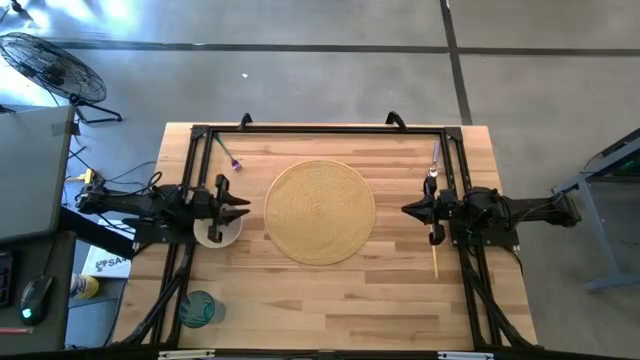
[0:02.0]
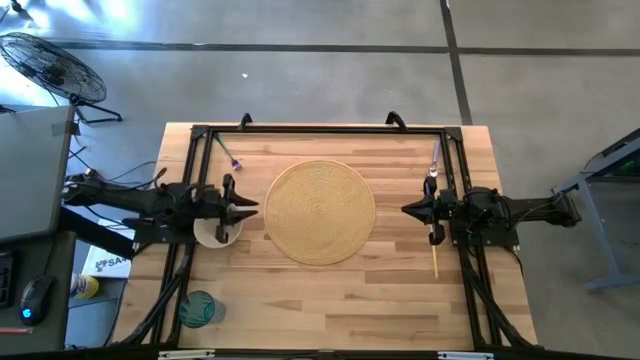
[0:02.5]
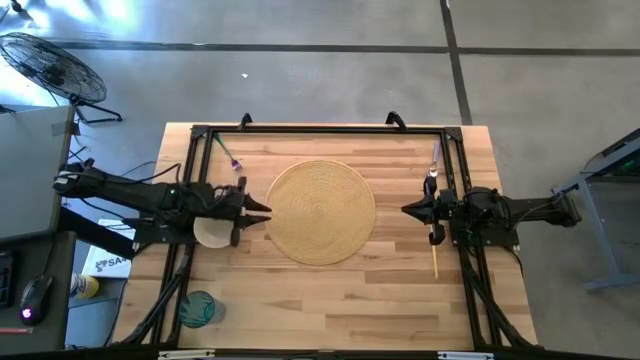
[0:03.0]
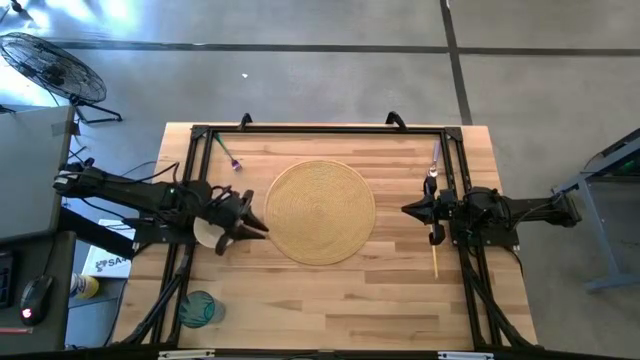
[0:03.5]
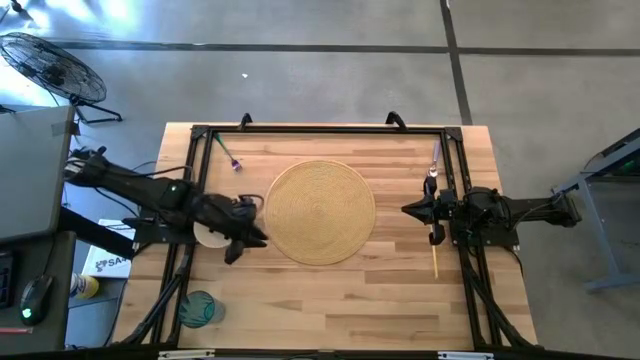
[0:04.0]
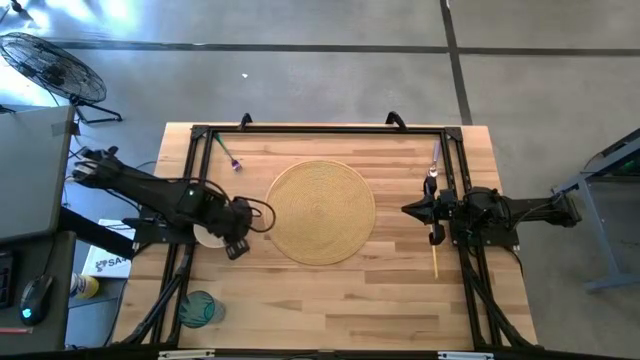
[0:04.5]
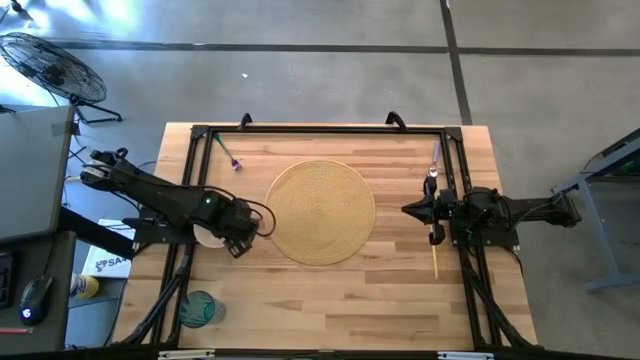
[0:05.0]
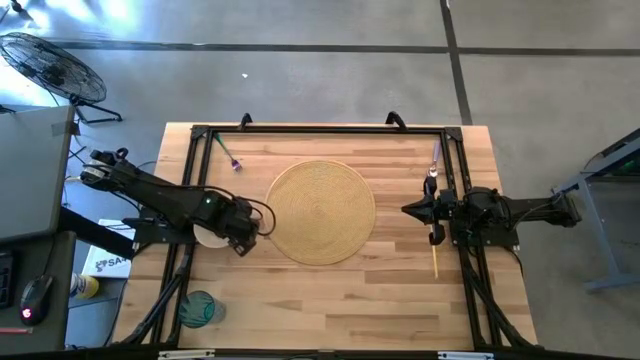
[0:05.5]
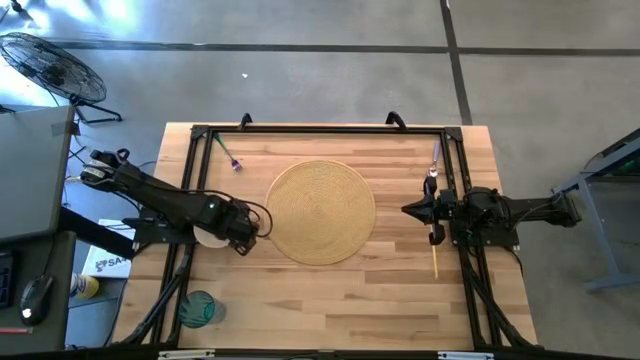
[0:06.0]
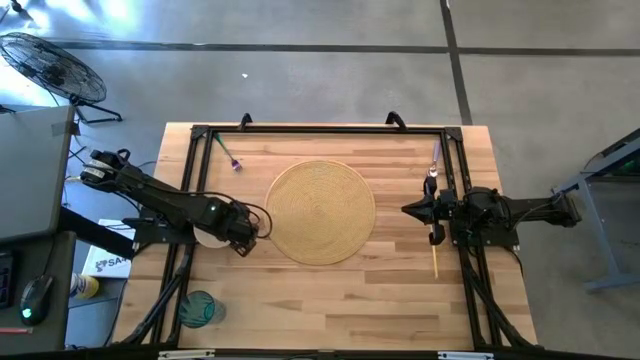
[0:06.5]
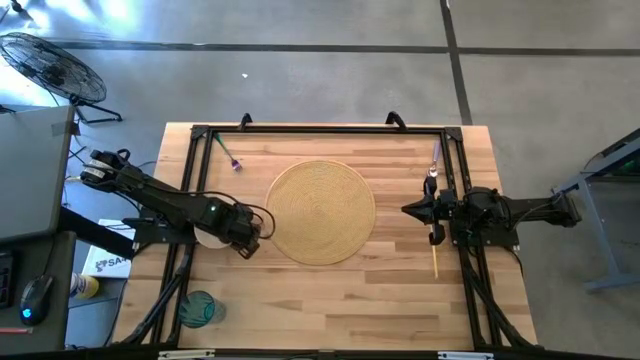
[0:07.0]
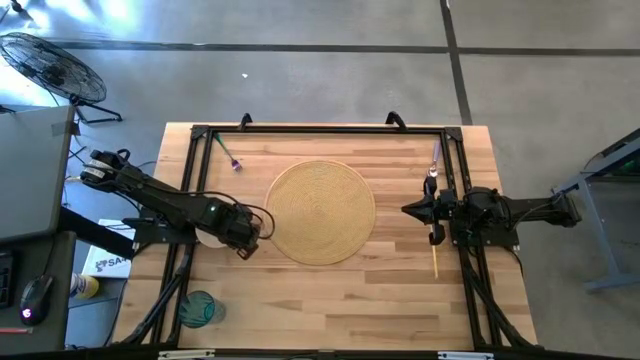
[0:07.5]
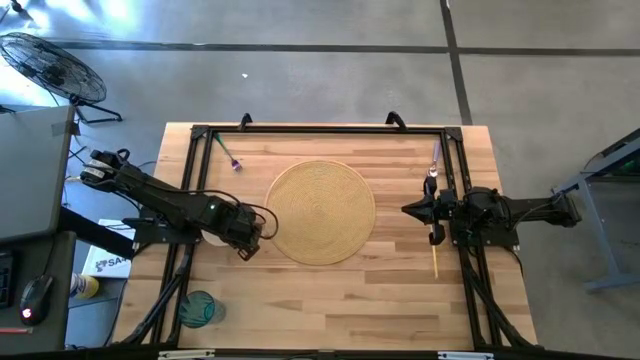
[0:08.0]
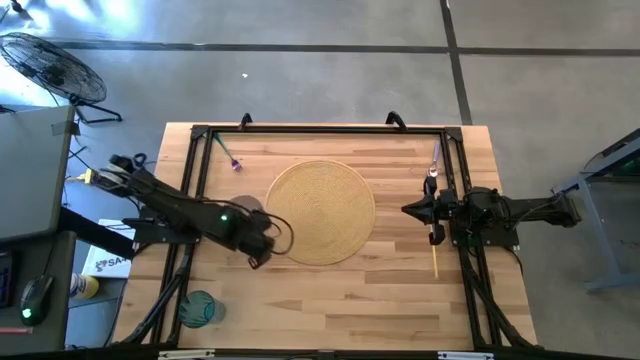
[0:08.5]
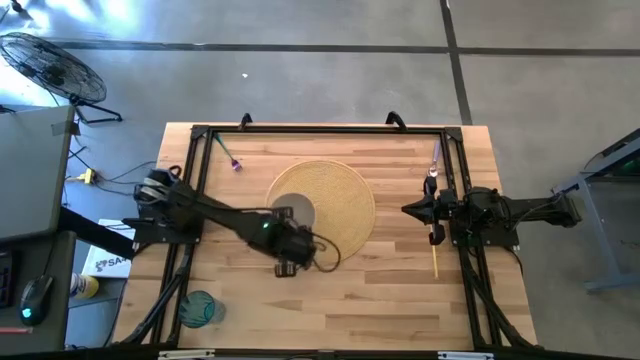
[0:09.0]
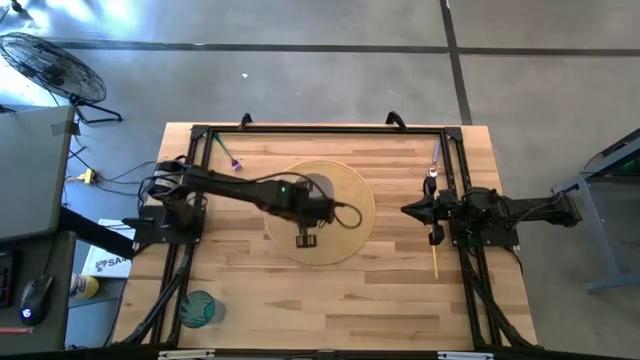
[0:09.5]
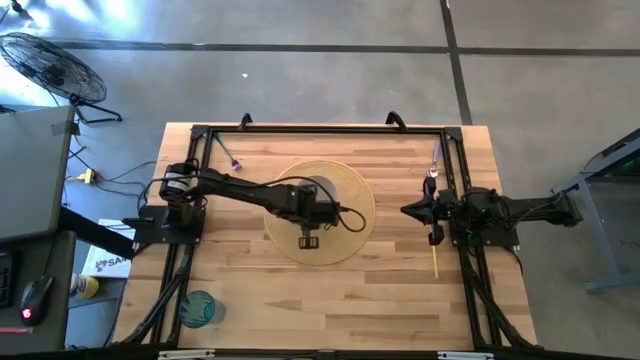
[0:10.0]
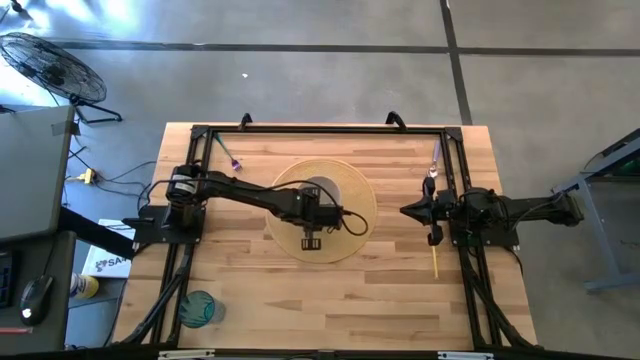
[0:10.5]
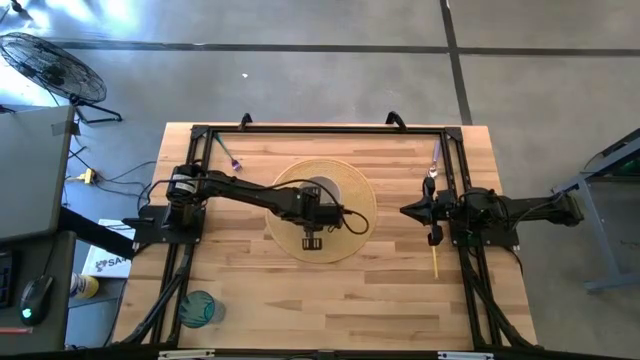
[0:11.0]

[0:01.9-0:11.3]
Task: Pick & Place Utensil
Put the white bowl on the brown placemat

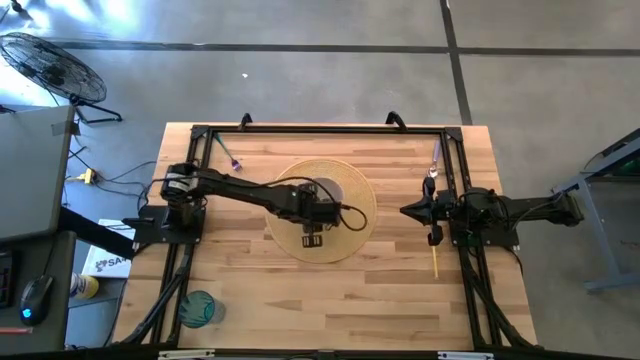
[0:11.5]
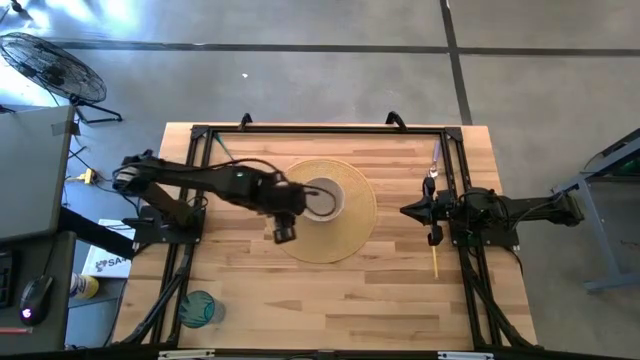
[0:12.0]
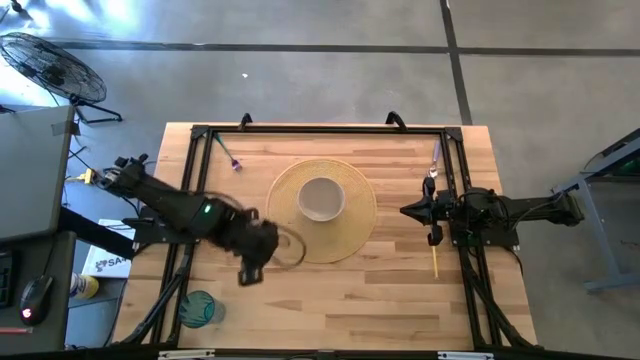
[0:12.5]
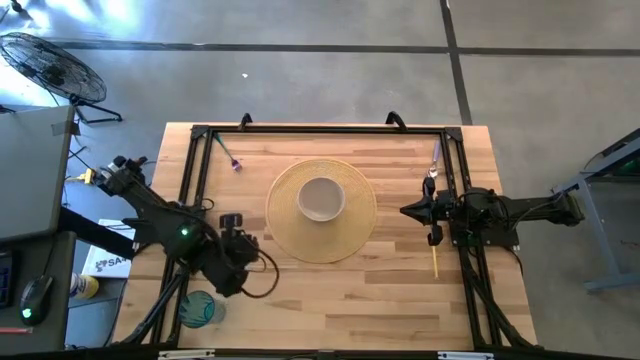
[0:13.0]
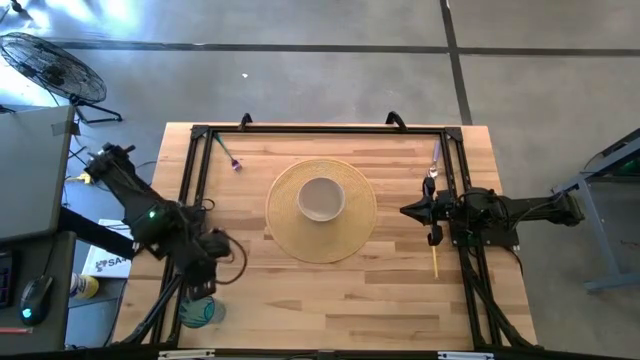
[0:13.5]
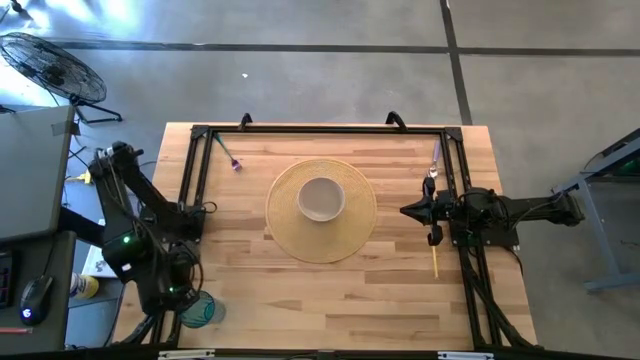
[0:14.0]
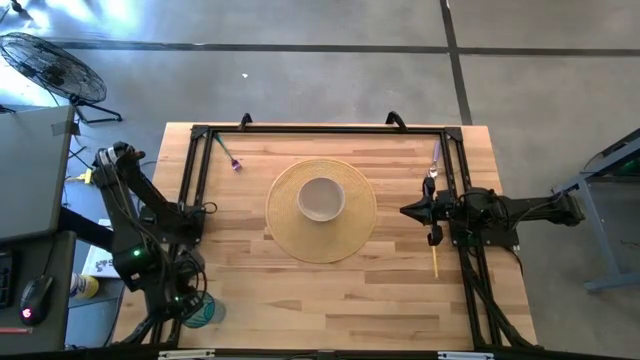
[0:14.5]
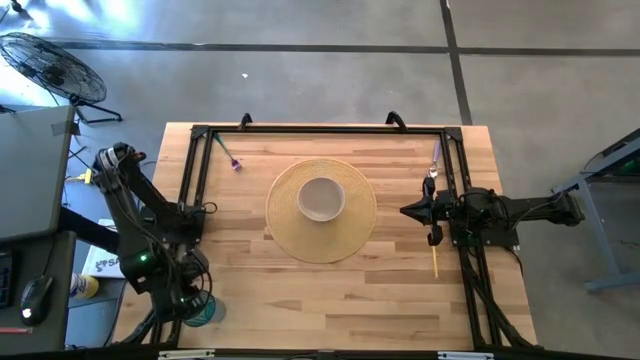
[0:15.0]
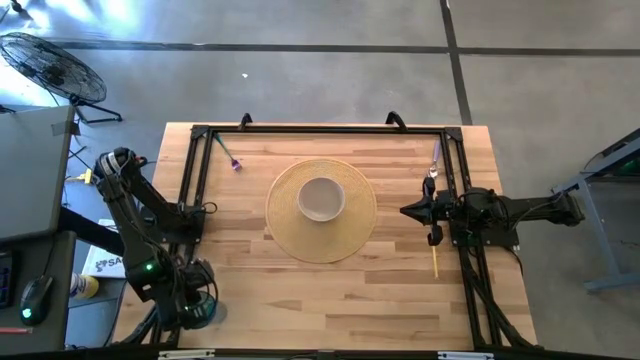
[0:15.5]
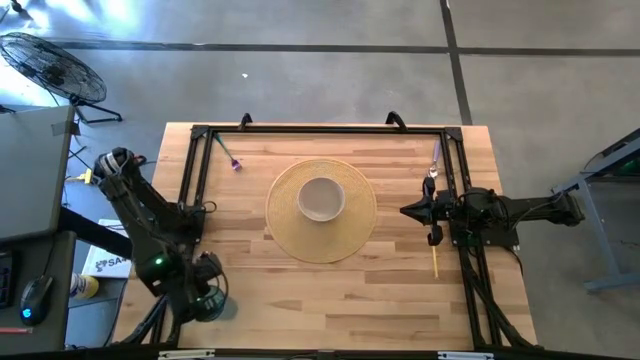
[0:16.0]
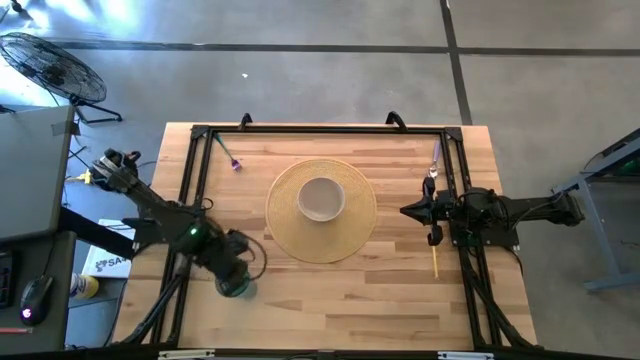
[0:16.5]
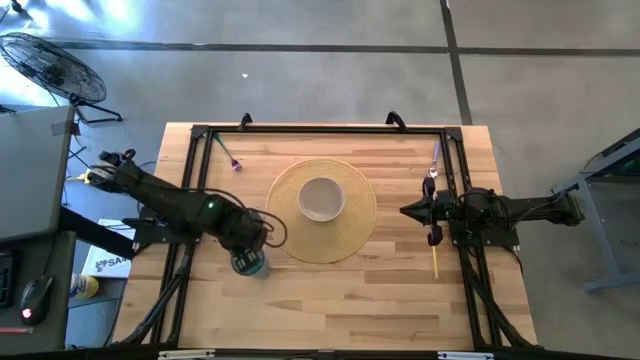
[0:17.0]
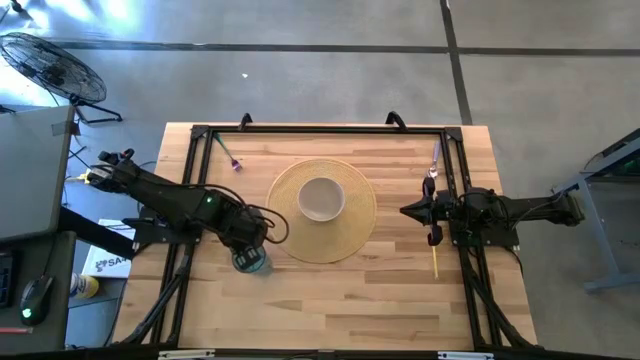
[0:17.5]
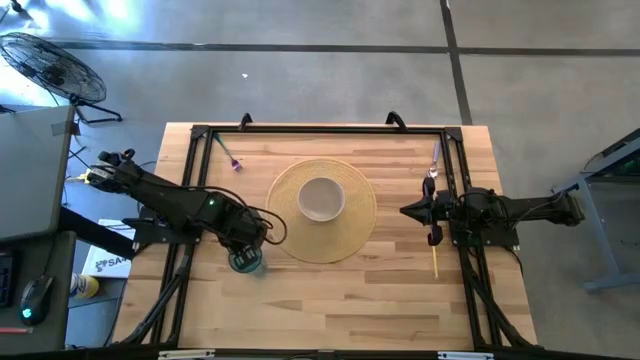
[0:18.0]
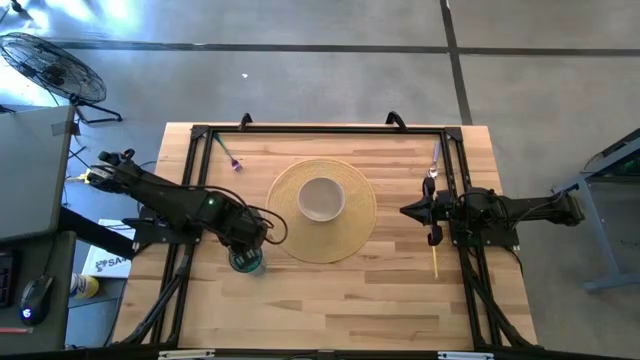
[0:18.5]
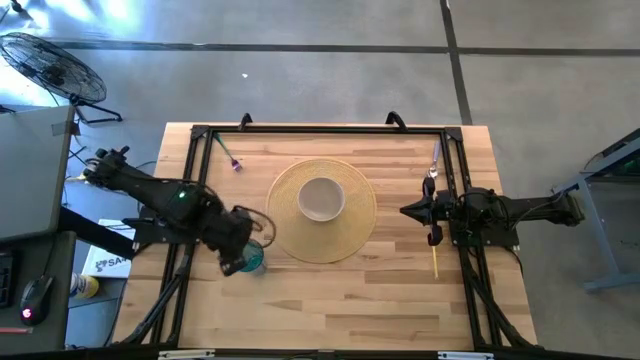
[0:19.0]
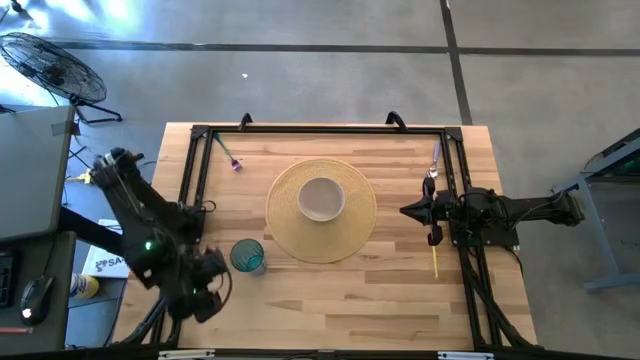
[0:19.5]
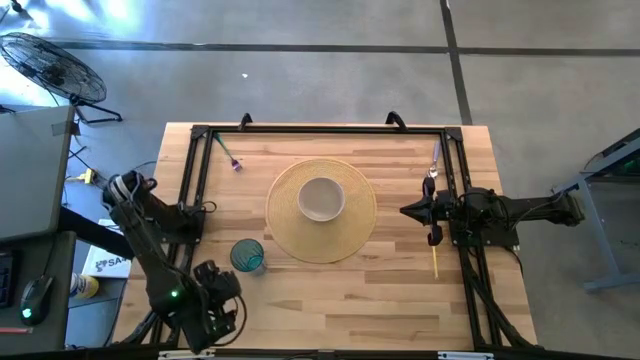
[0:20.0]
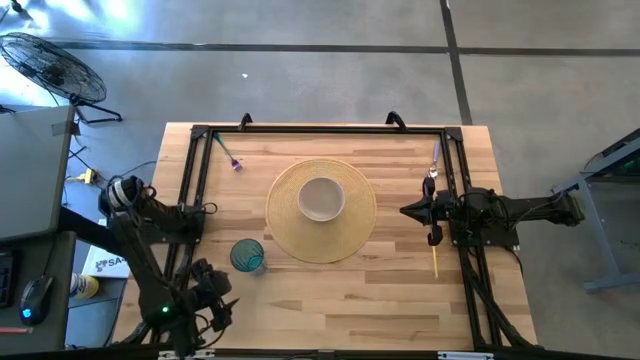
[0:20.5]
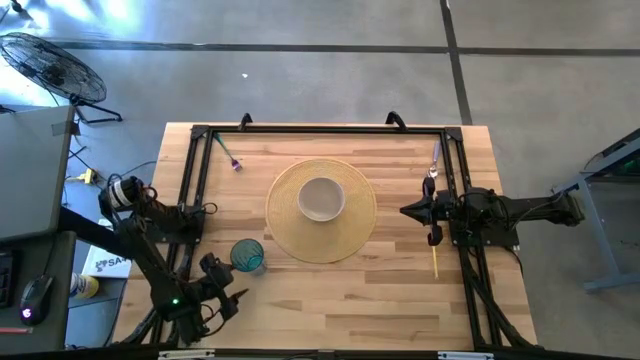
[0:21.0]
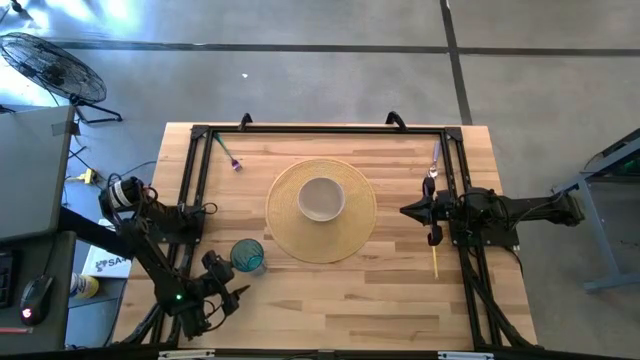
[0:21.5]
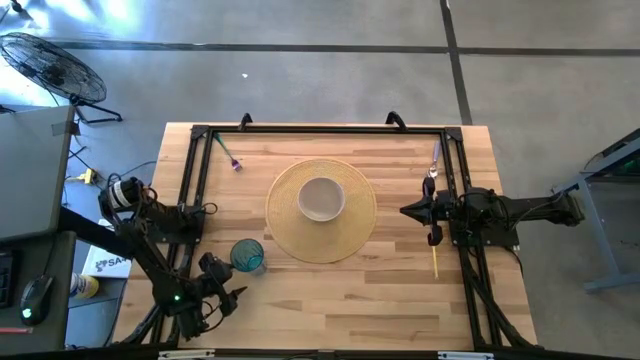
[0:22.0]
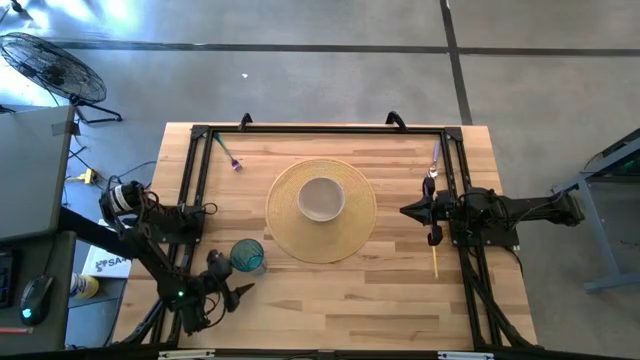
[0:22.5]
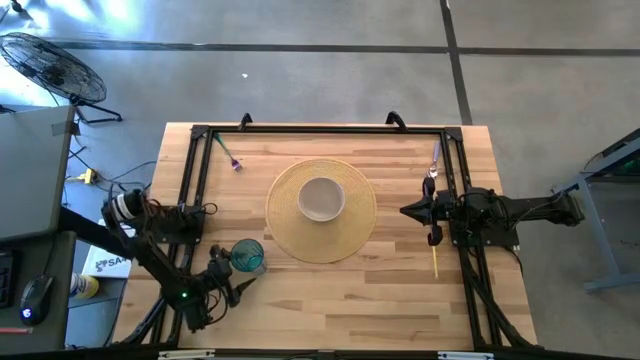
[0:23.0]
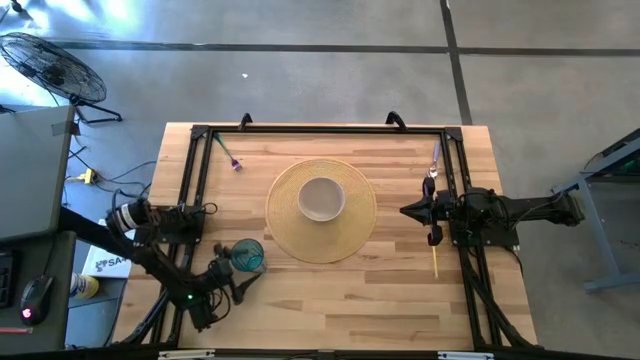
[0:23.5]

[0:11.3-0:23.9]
Put the blue cup on the brown placemat to the top right of the white bowl
